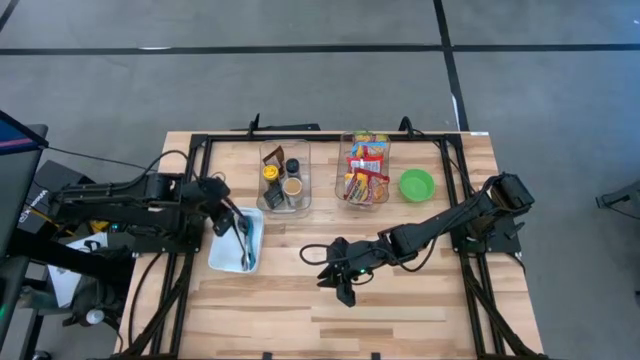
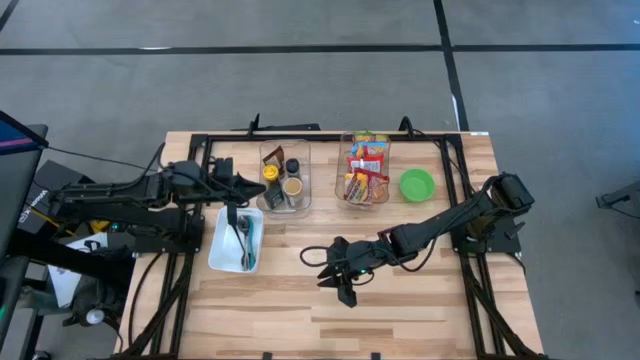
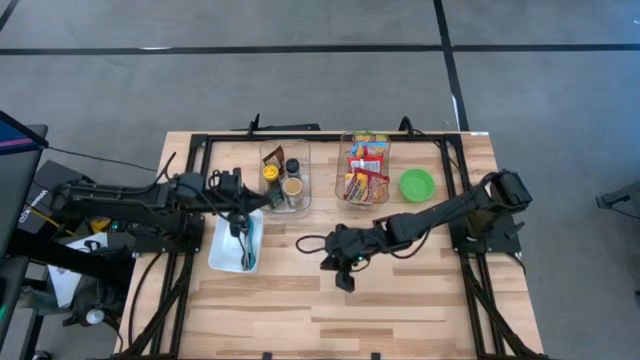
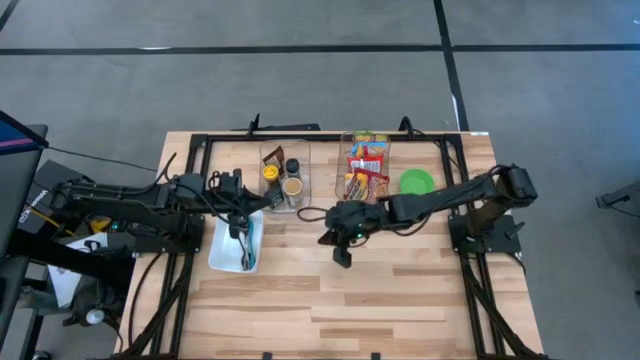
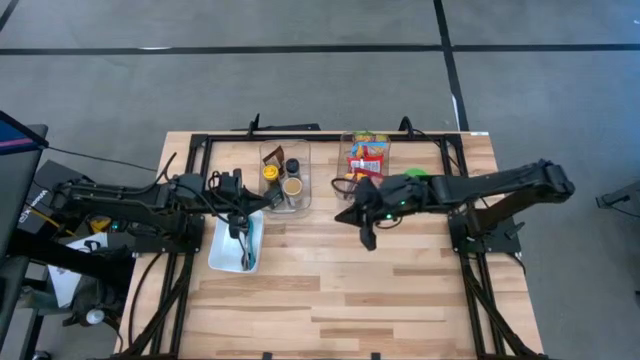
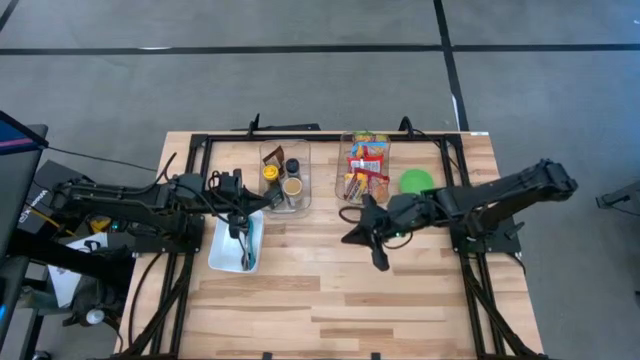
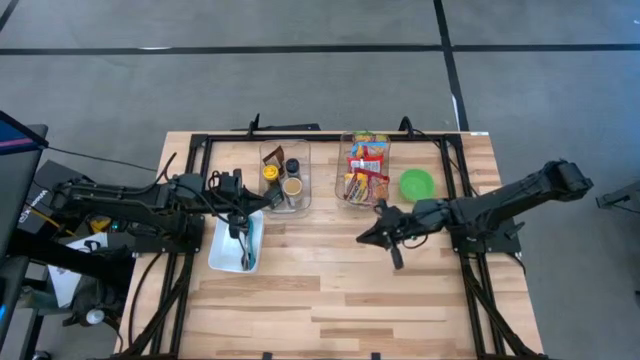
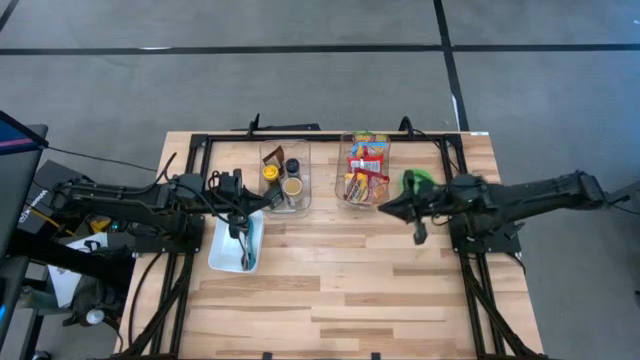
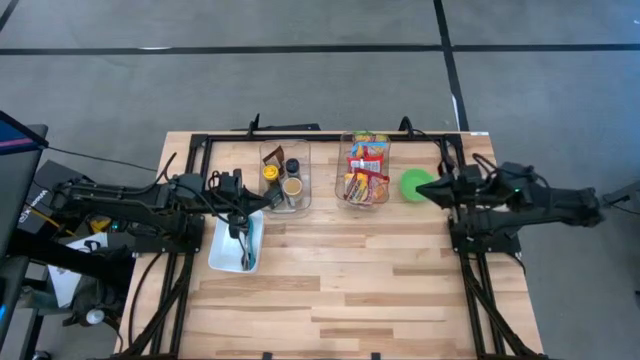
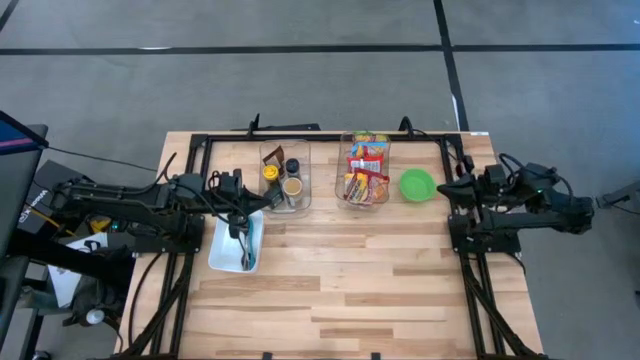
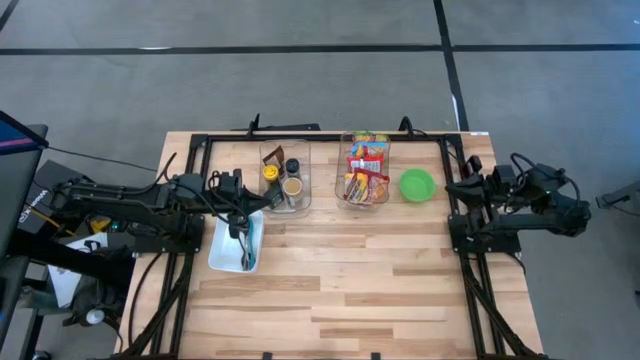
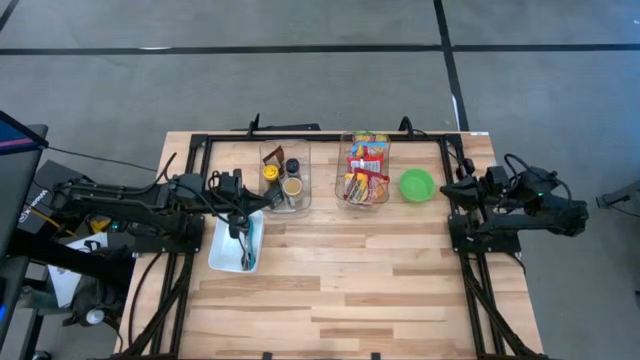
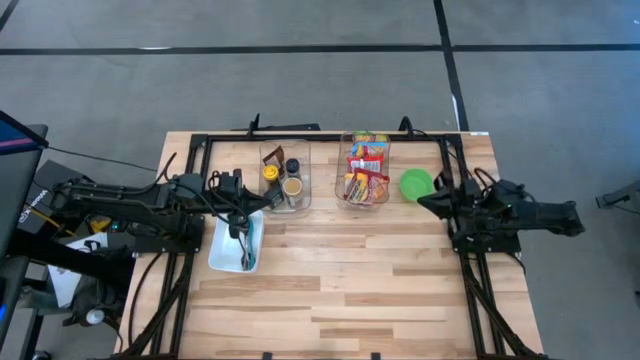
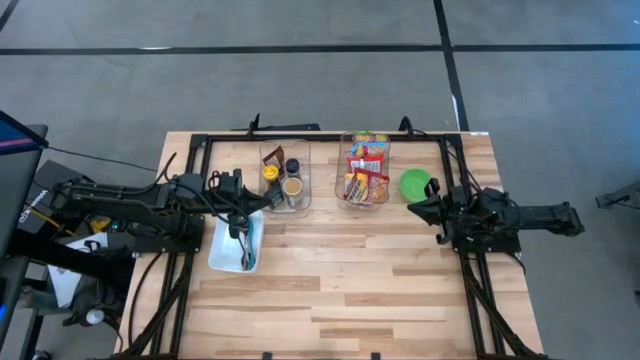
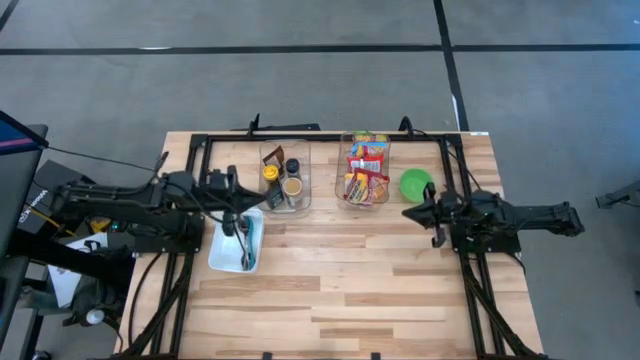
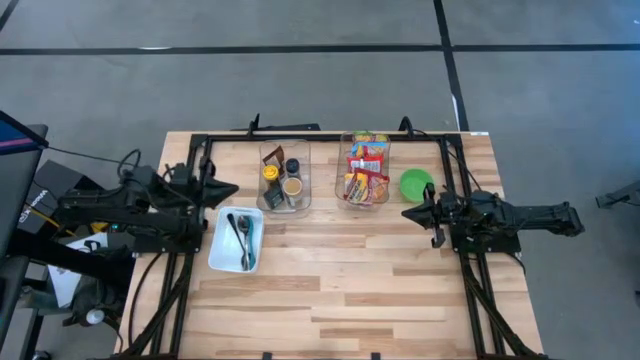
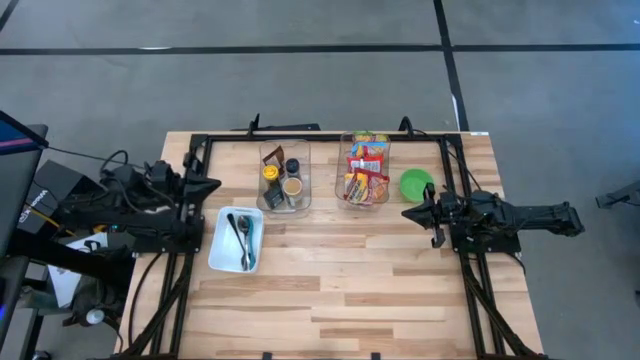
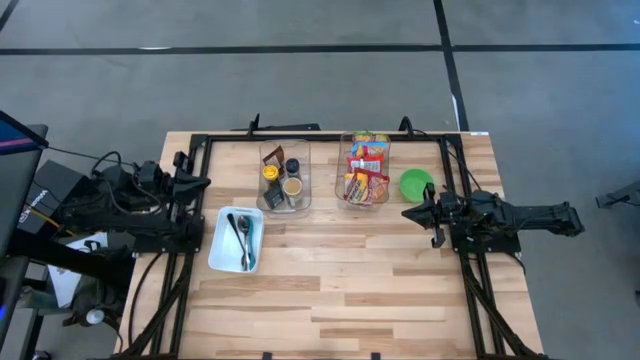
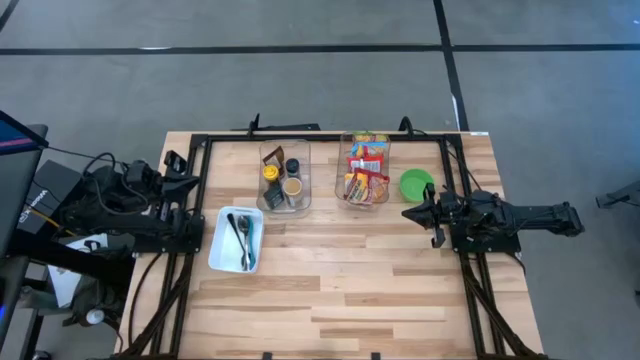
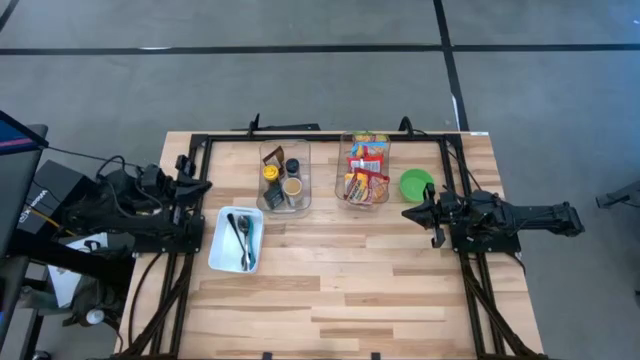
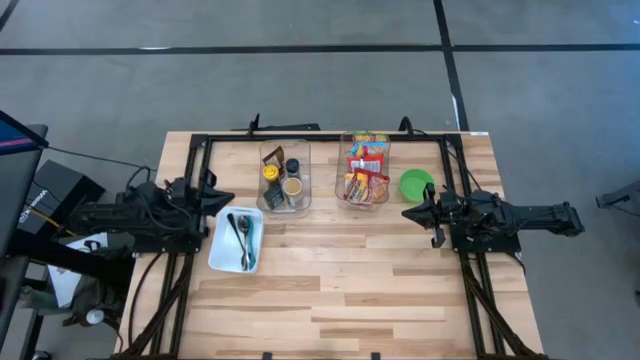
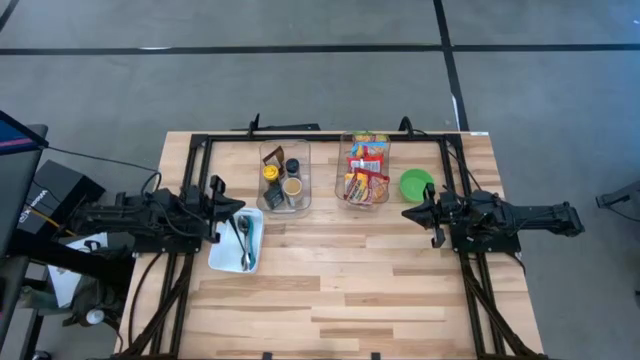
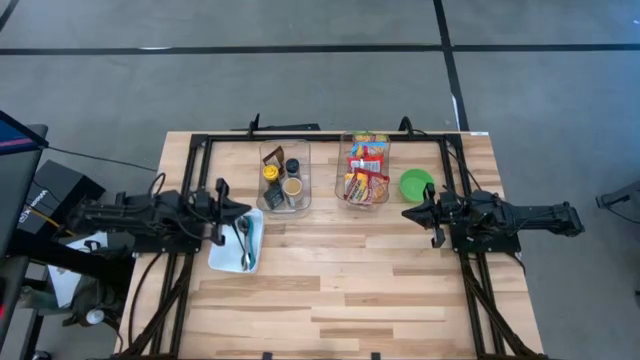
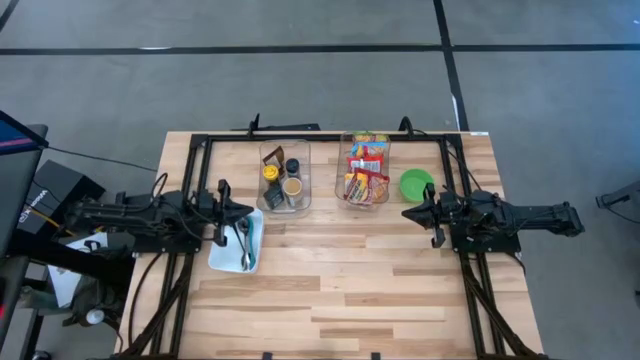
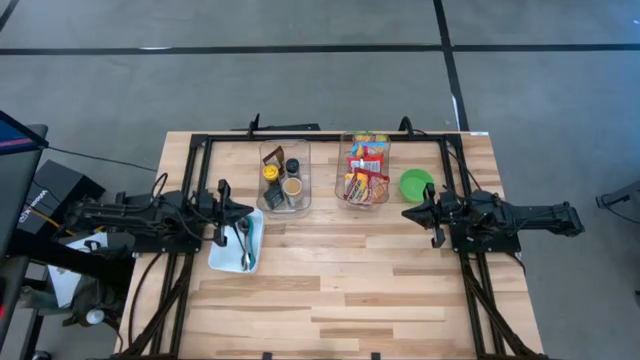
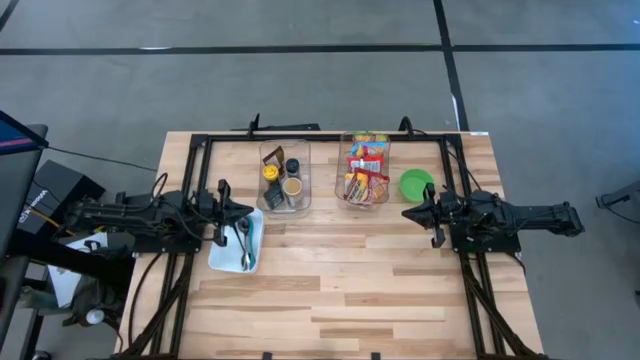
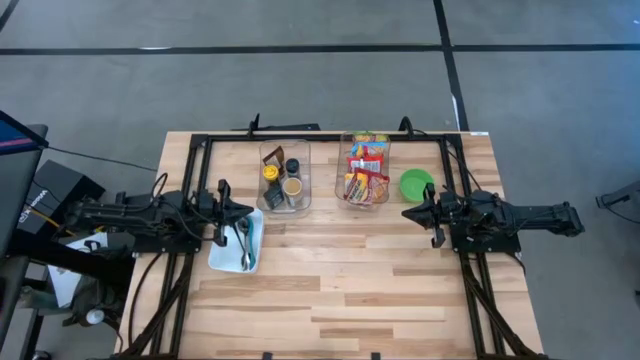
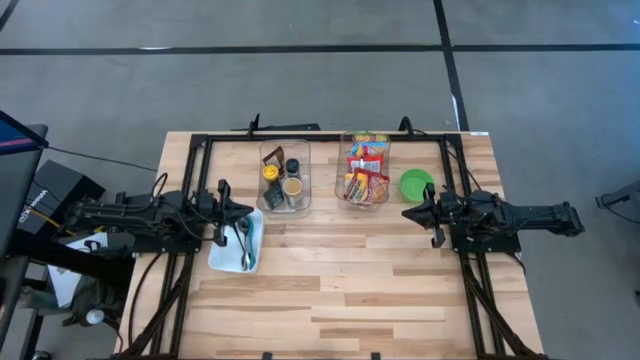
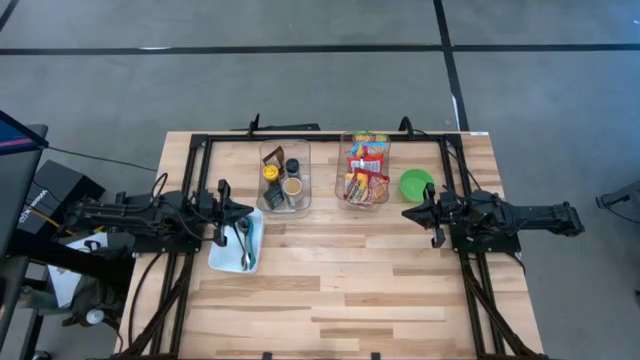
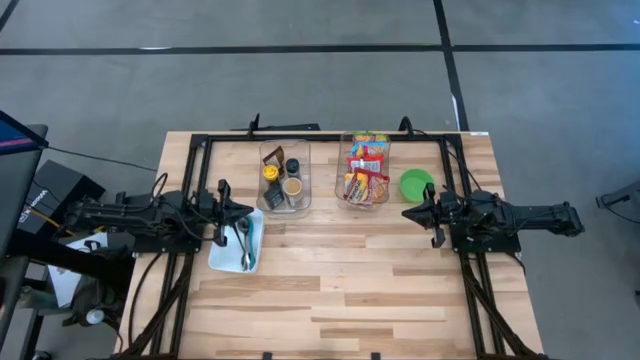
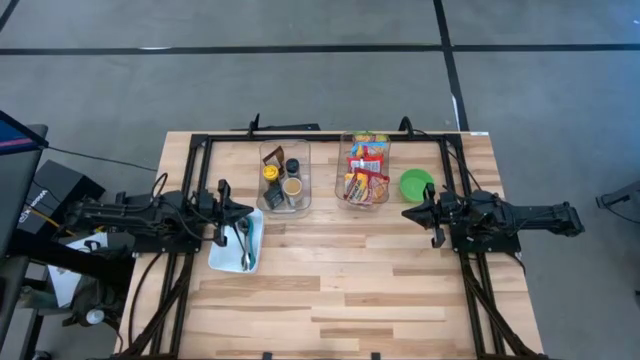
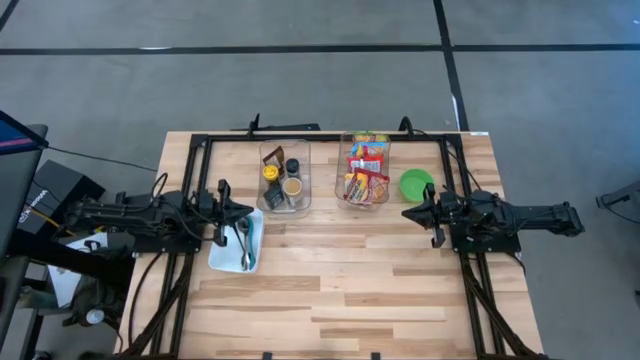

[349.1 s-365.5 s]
Task: Pick & Place Food Item
Return to Home Position

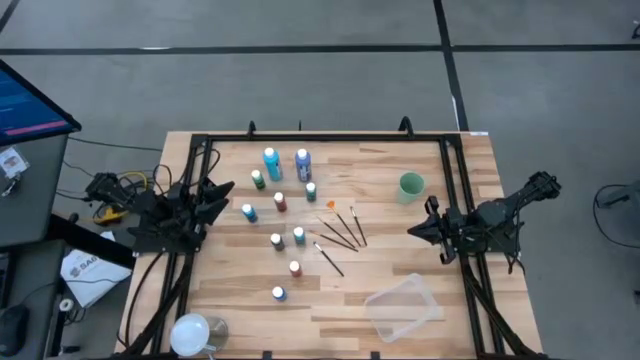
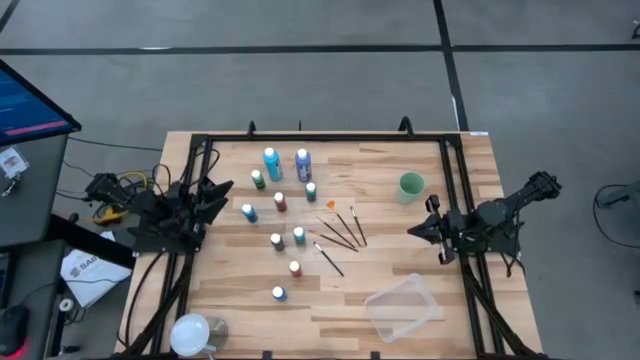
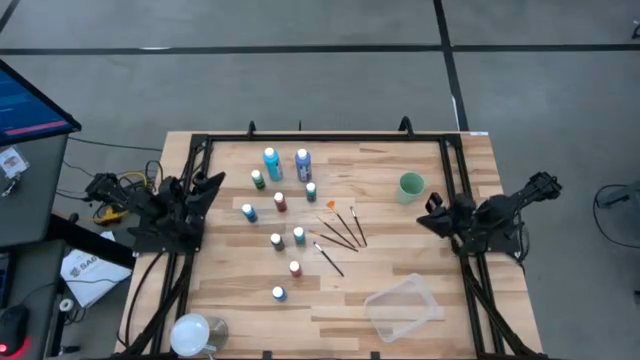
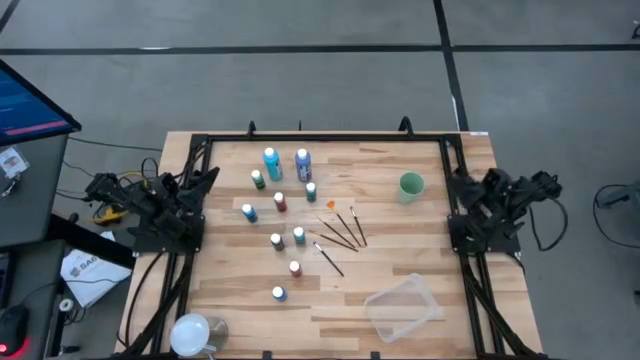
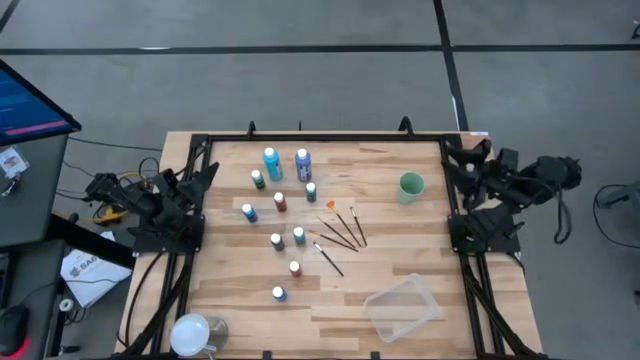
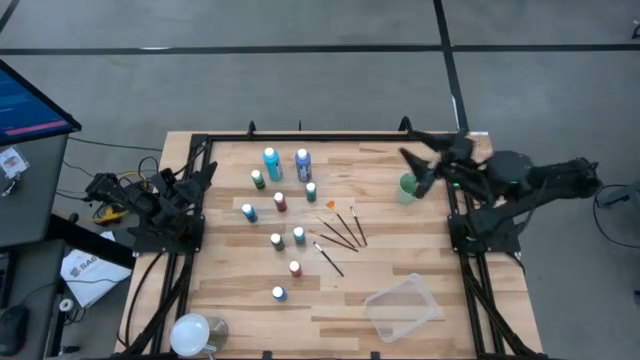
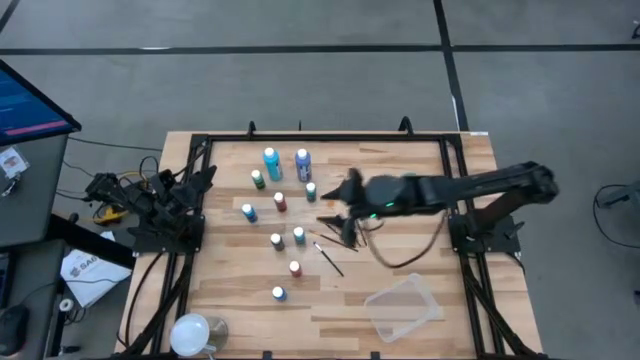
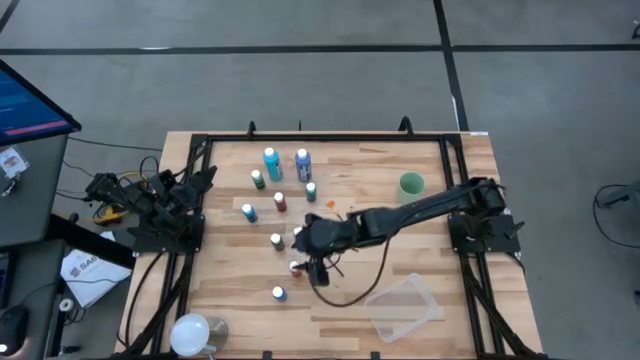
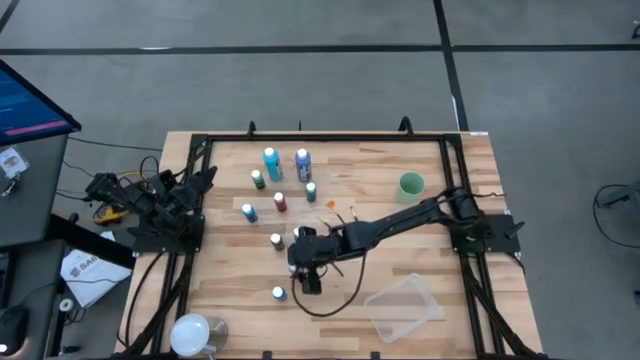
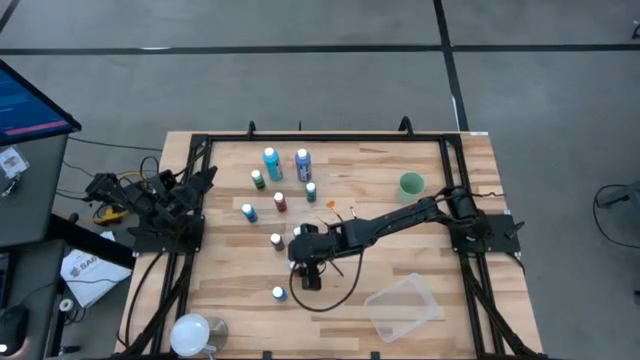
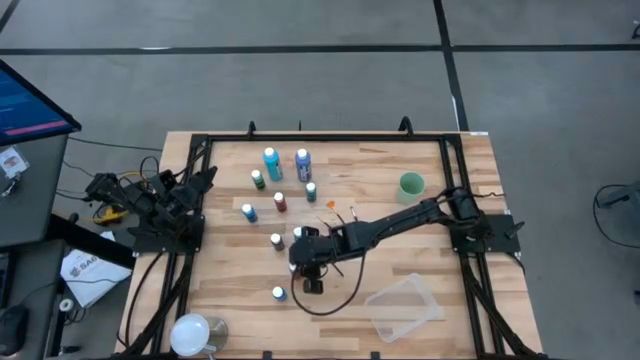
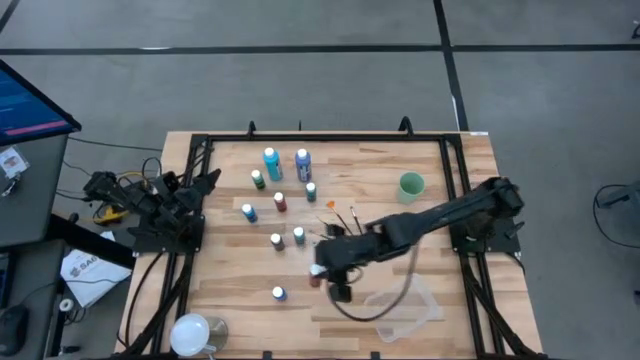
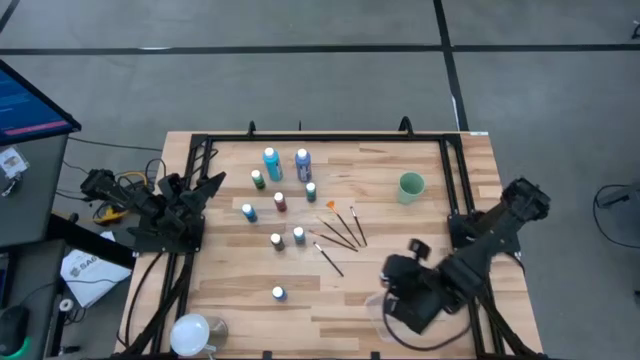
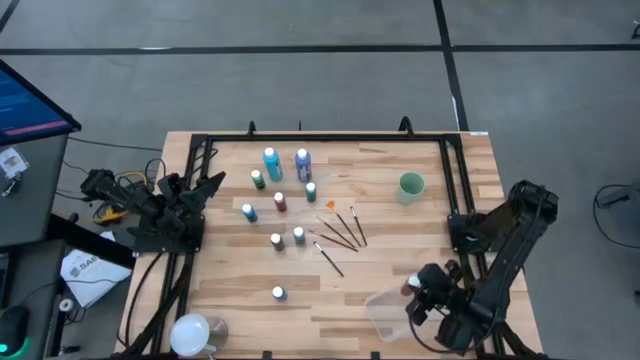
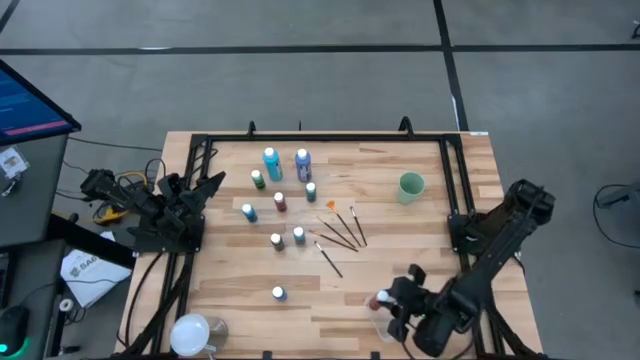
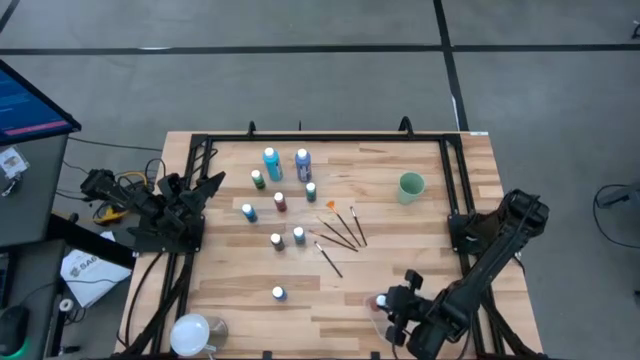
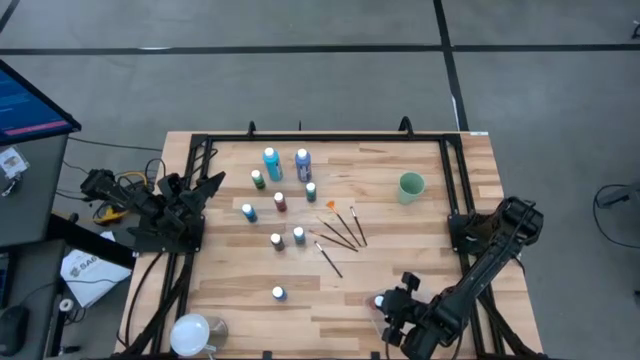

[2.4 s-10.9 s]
Task: Pick & Place Paint Supplies
Put the red paint bottle into the transparent bin
